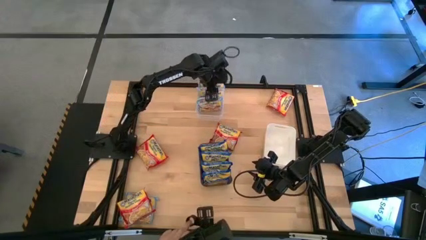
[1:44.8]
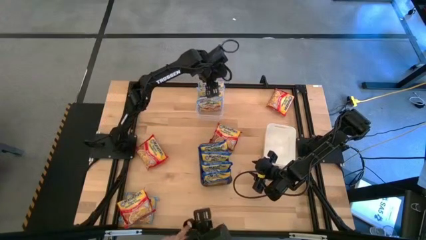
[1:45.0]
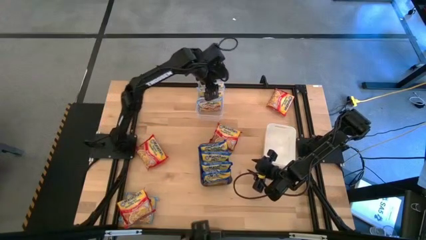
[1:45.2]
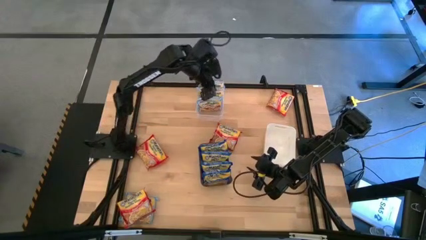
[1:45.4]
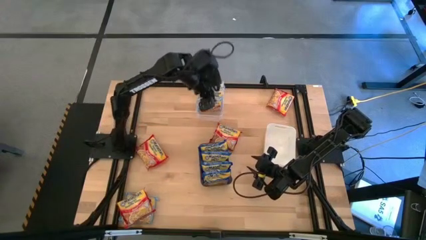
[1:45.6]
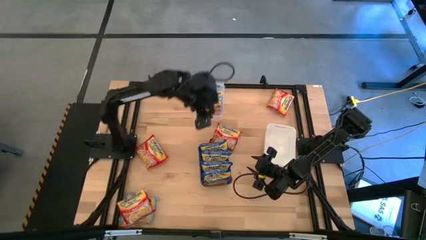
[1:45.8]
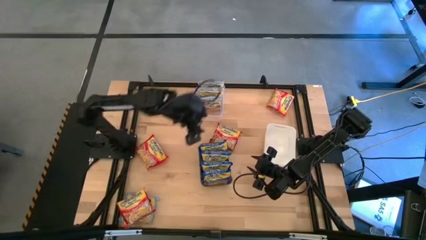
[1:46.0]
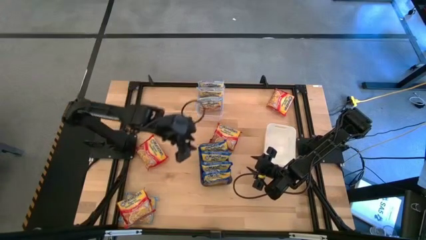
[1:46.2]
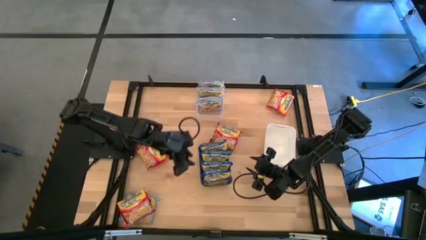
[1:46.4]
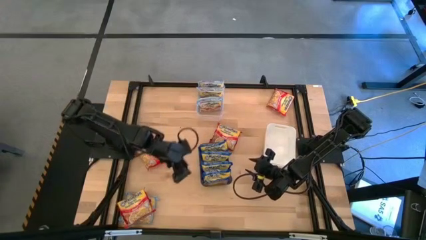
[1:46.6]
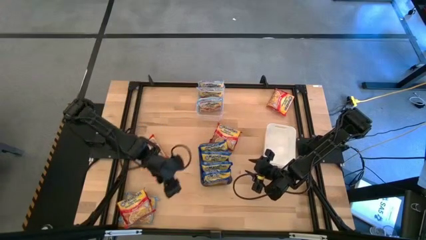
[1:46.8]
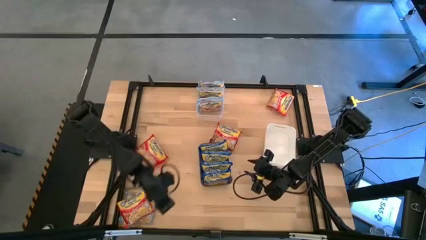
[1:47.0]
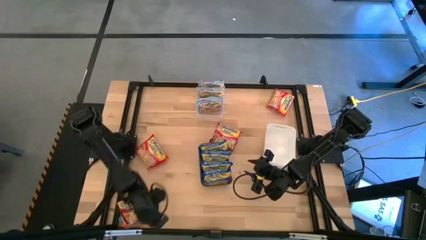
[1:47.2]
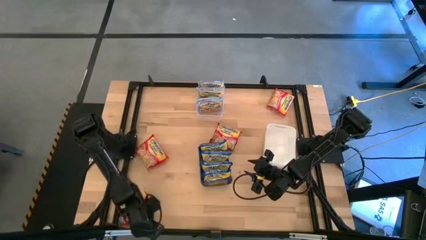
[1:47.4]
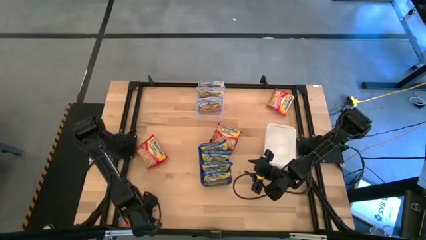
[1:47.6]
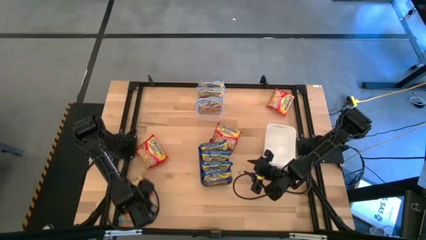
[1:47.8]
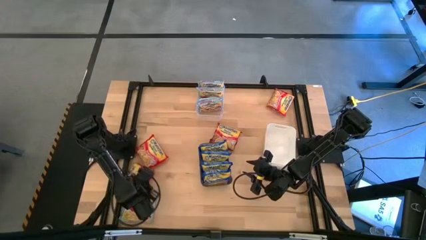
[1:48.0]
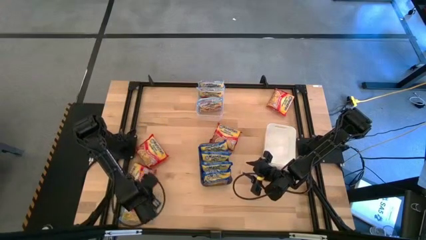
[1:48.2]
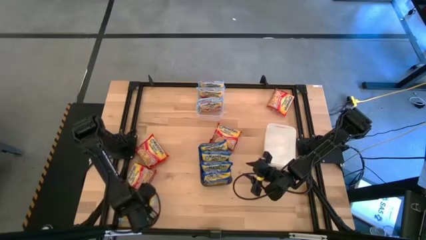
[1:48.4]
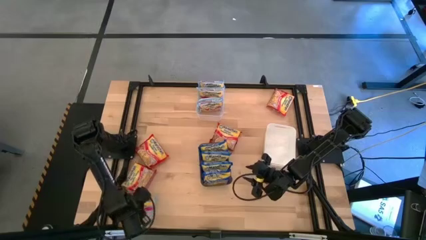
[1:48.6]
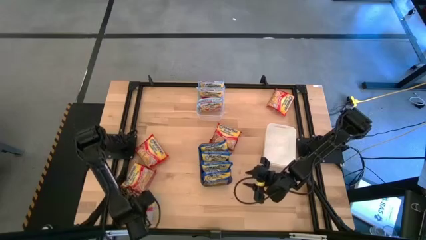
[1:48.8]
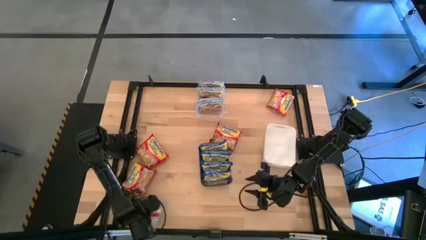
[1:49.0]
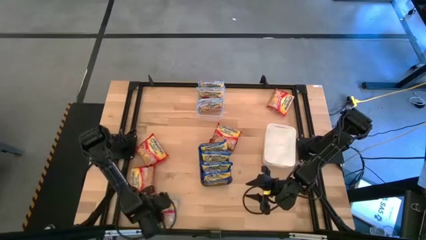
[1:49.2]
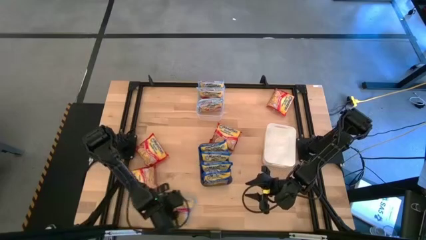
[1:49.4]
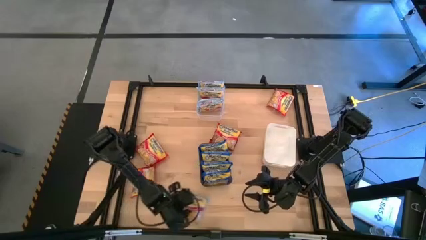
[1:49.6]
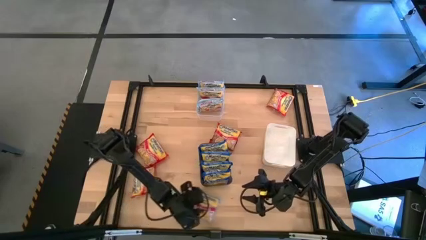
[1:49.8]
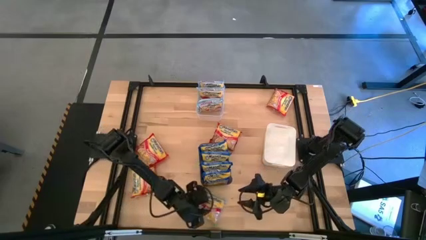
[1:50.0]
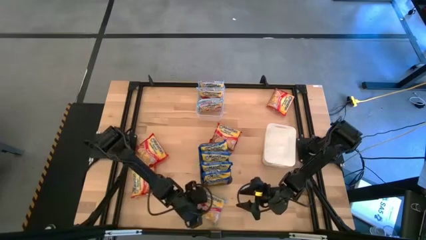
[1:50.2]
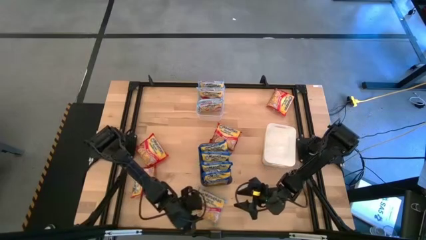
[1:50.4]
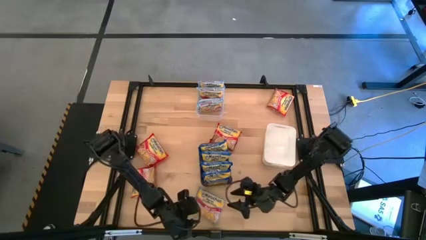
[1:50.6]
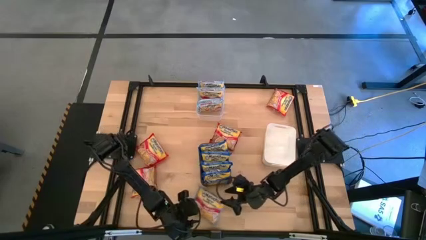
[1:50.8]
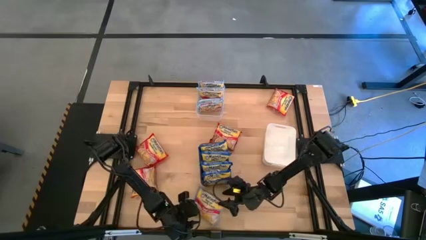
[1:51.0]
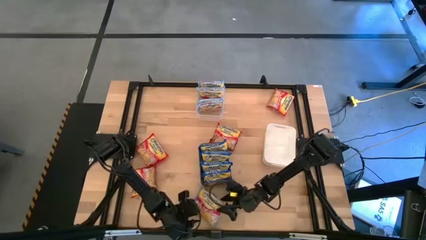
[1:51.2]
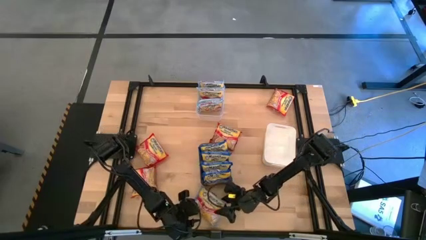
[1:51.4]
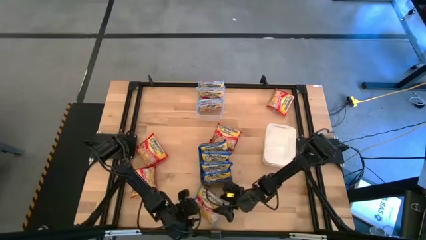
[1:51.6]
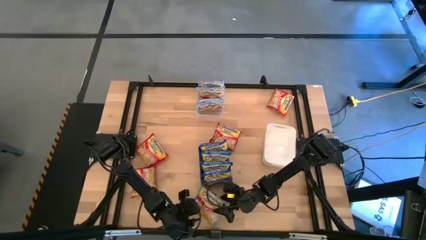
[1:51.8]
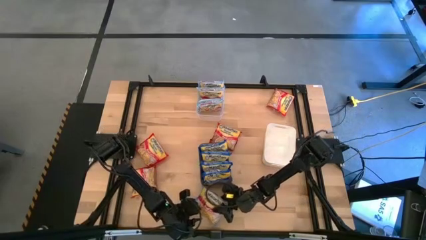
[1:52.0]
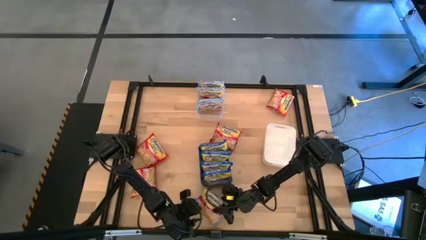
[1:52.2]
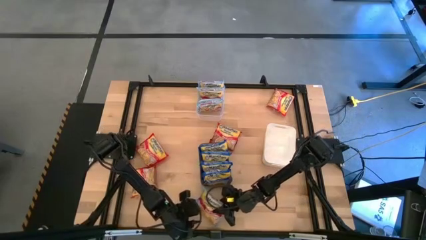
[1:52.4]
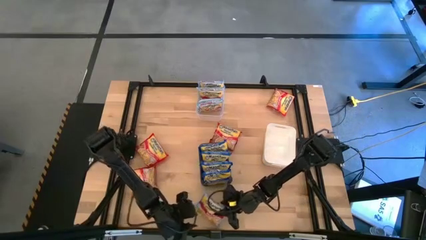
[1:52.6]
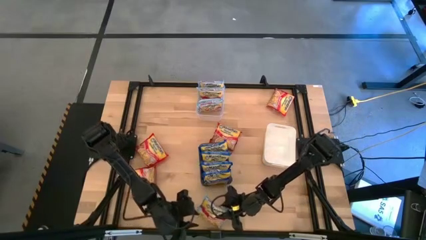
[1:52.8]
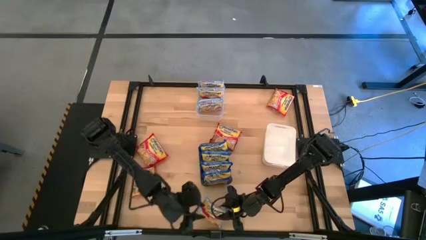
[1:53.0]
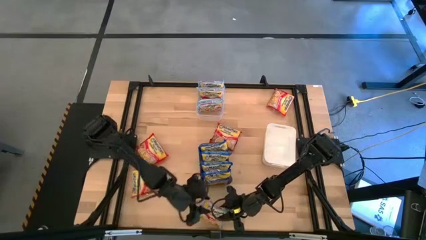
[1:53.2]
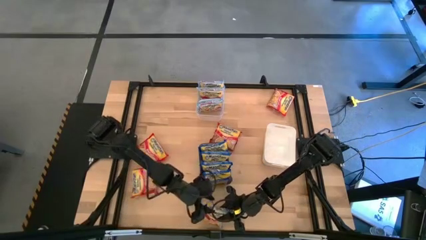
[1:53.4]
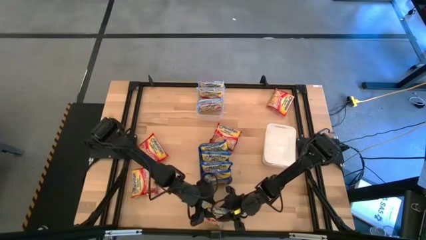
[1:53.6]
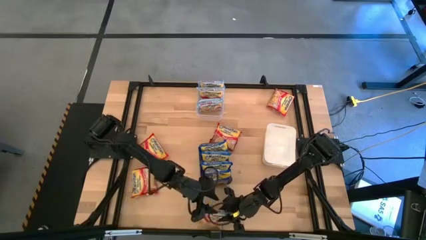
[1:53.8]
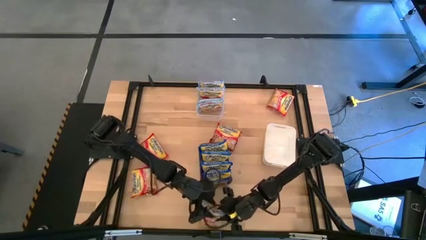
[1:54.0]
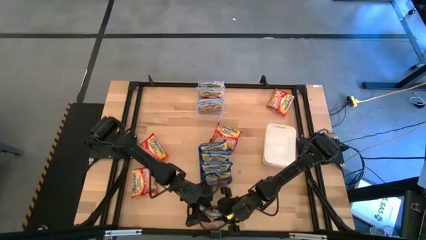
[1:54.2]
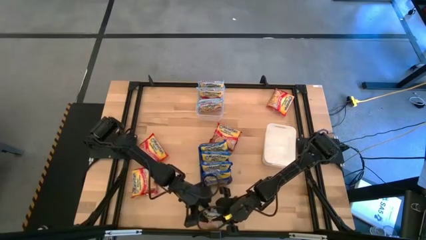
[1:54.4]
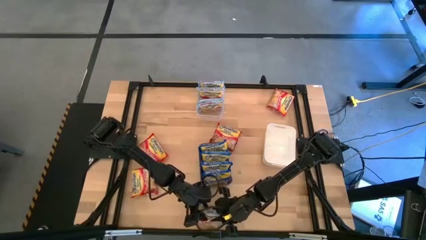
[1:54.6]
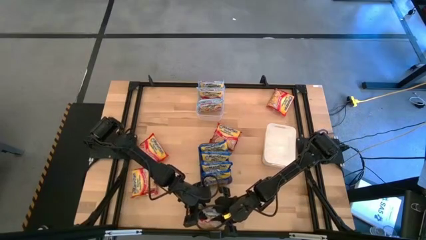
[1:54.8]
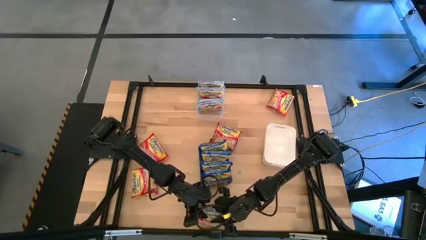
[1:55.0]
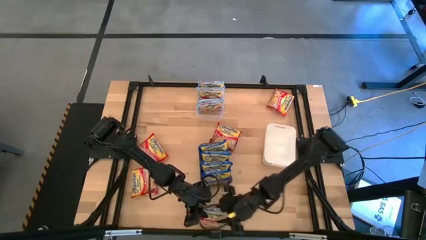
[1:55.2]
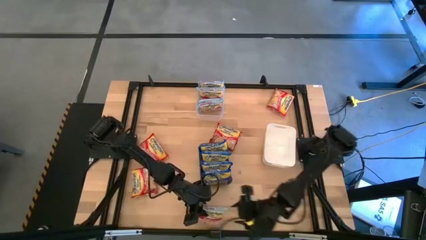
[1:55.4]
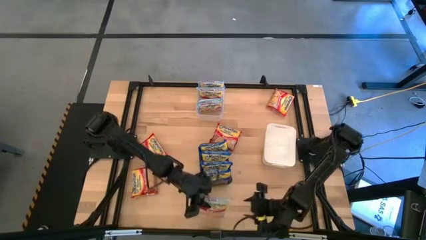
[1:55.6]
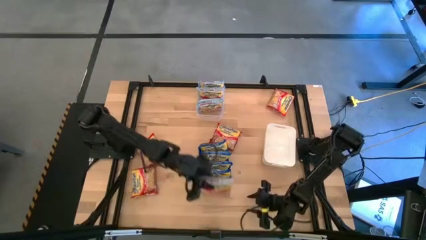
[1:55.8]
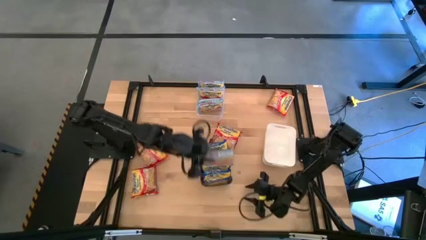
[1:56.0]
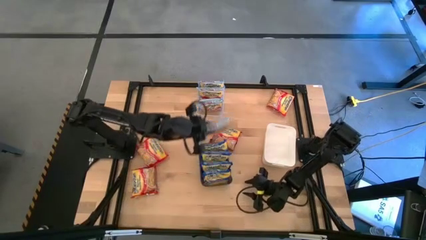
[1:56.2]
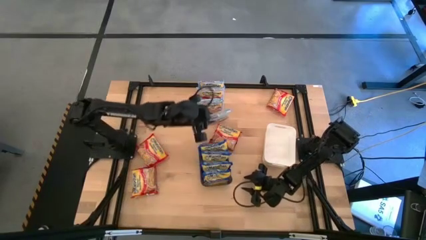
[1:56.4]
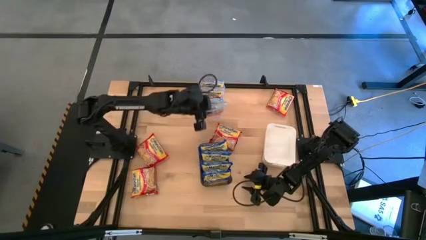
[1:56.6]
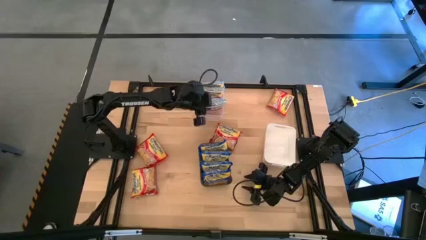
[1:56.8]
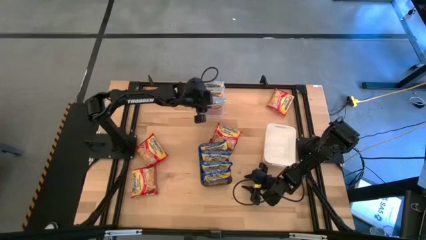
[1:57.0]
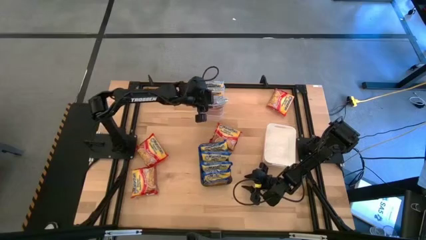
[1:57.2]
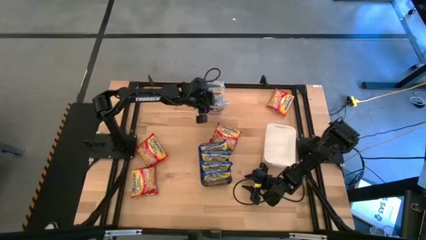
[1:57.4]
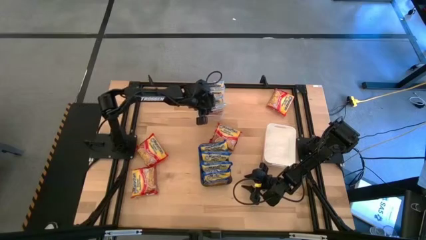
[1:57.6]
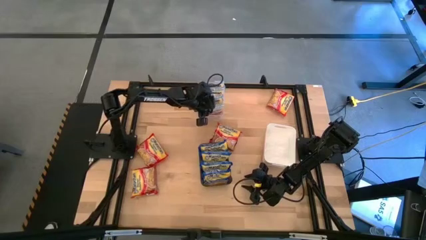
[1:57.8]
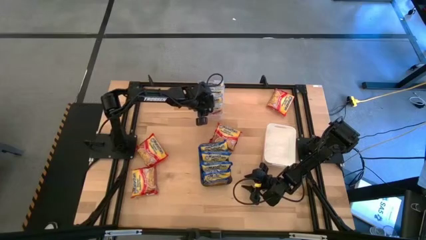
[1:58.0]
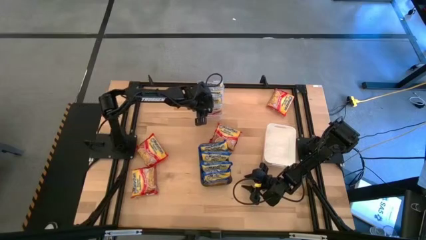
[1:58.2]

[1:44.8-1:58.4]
Task: Sort Maruchan noodles
Put the right light blue noodle pack into the transparent bin
